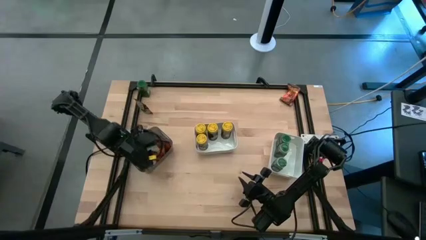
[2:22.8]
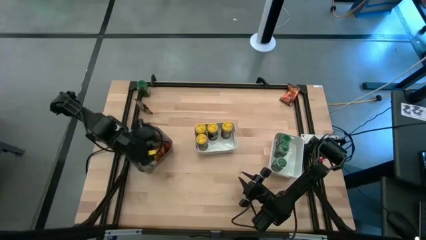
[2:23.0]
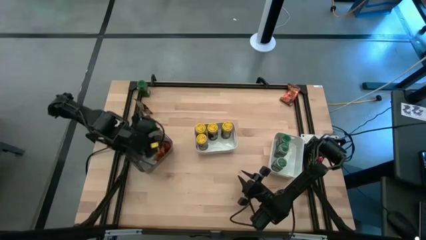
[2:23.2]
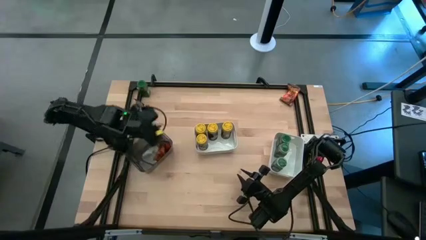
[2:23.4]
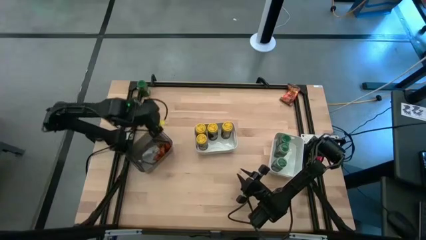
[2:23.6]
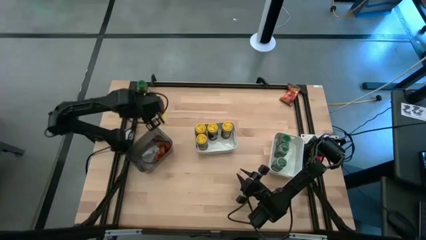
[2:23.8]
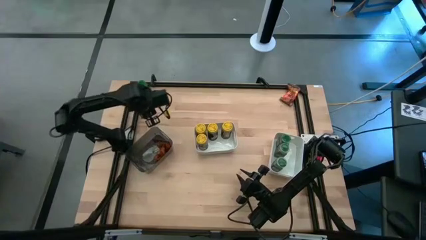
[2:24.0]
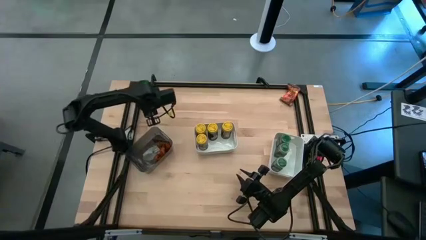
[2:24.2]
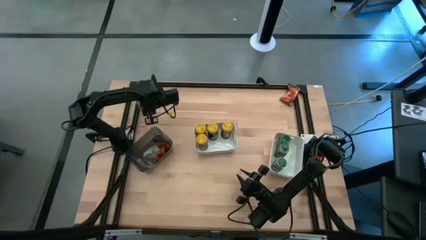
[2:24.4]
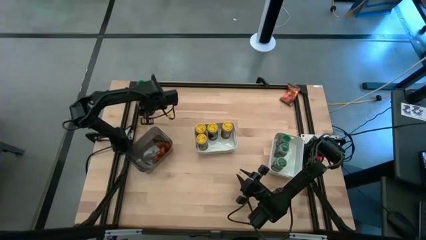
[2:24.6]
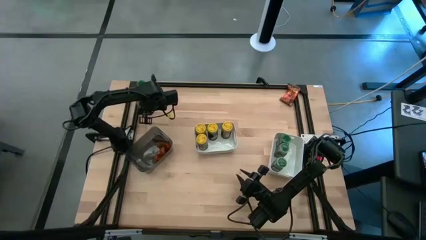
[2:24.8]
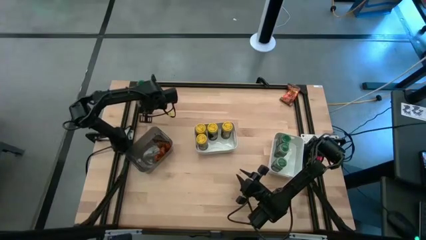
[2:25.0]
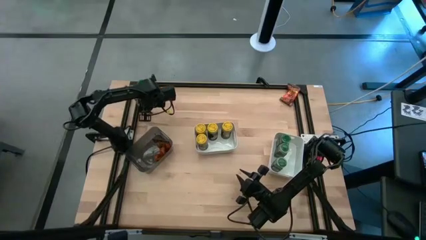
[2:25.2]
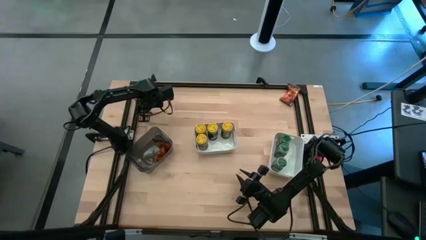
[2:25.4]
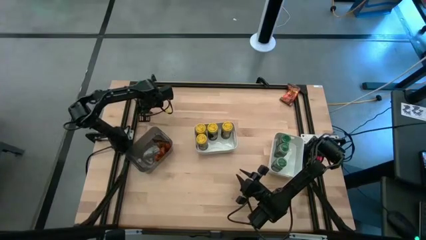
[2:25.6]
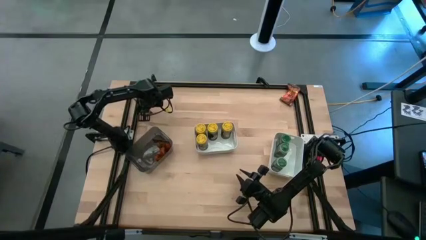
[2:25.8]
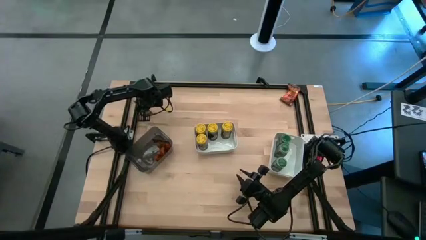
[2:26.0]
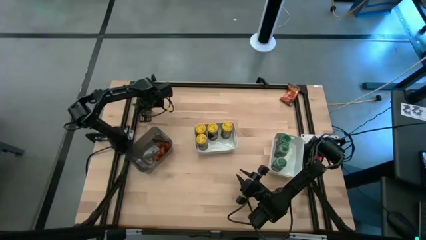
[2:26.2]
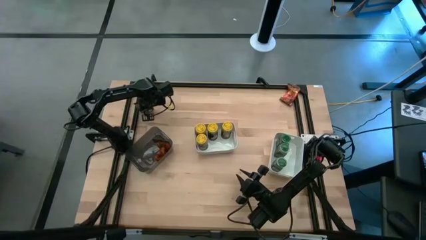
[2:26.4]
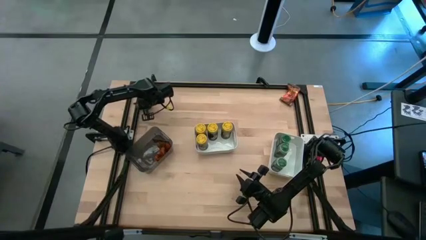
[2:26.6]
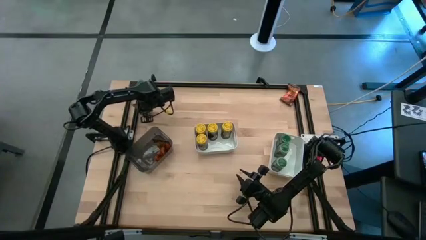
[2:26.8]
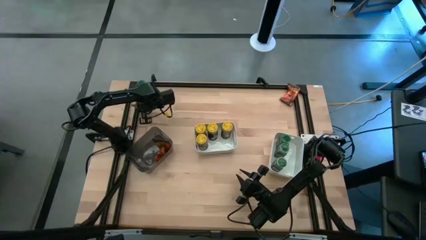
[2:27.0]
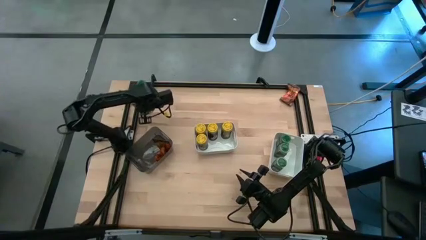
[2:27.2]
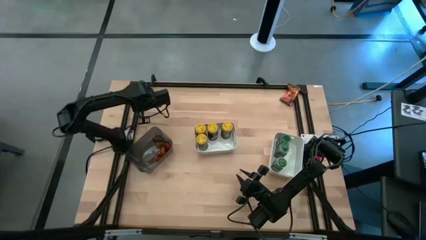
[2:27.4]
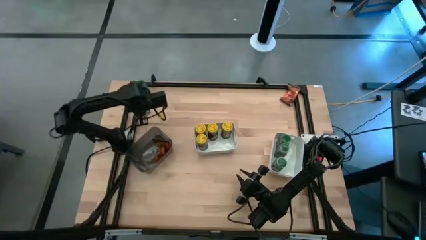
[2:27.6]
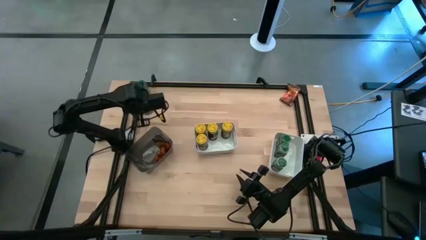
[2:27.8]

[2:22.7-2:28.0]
Task: Sort spices by type
Put the left orange seasoning pack into the black bin

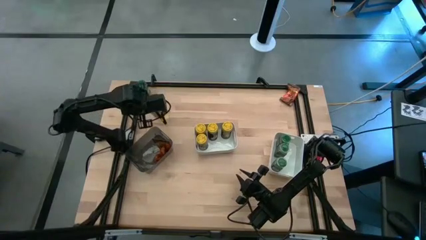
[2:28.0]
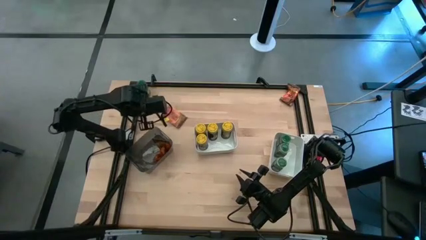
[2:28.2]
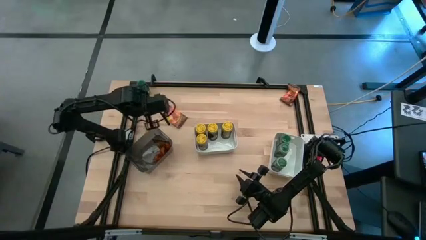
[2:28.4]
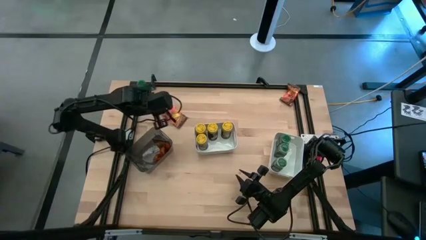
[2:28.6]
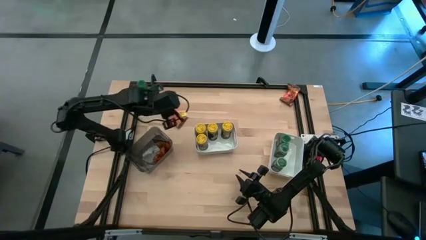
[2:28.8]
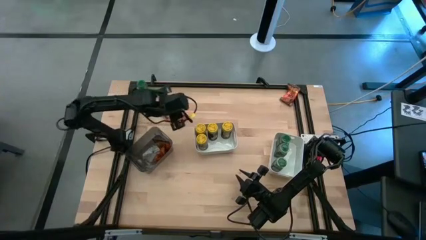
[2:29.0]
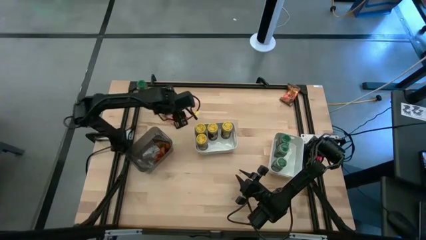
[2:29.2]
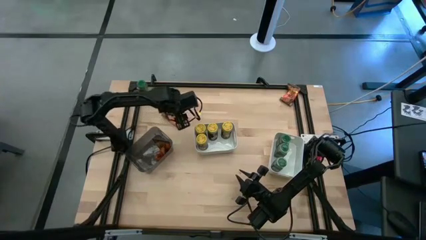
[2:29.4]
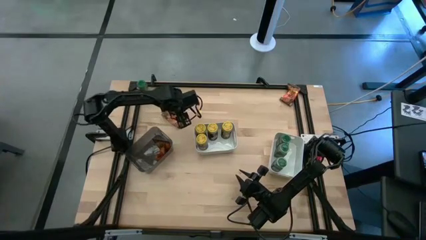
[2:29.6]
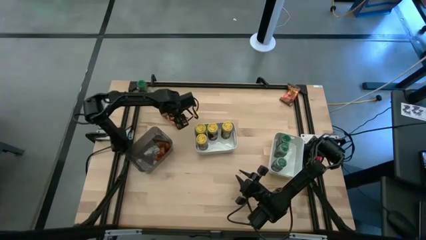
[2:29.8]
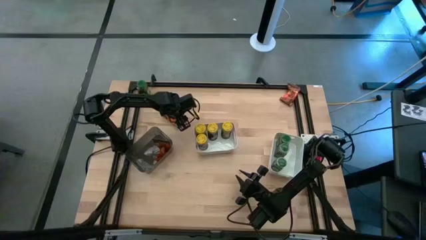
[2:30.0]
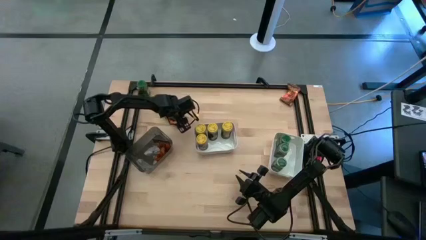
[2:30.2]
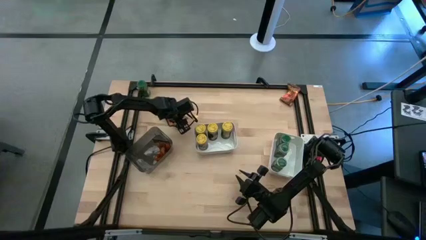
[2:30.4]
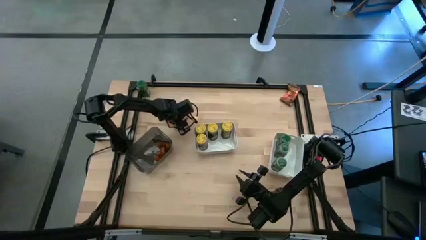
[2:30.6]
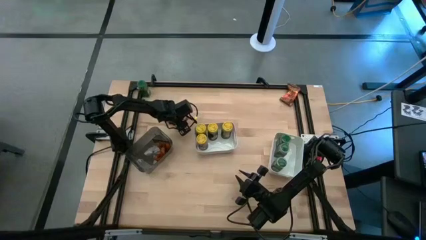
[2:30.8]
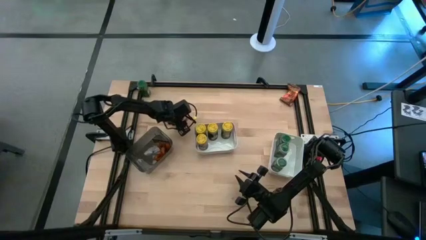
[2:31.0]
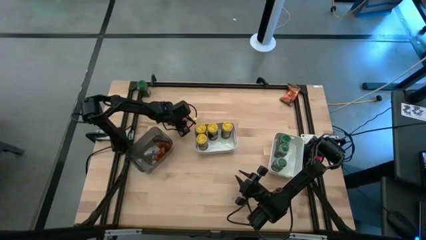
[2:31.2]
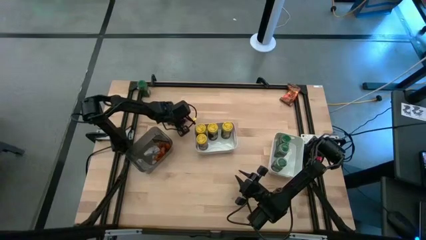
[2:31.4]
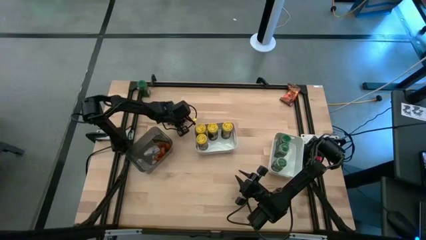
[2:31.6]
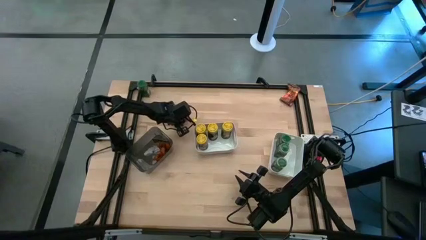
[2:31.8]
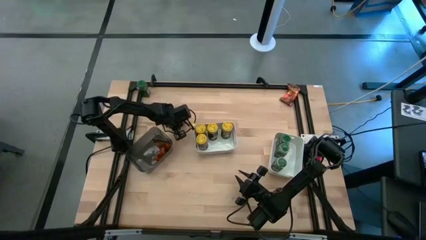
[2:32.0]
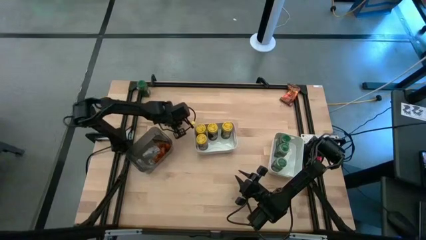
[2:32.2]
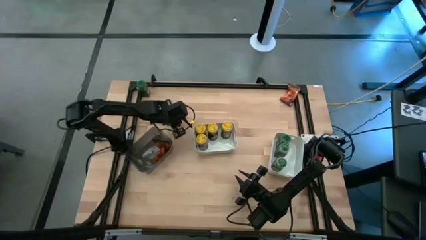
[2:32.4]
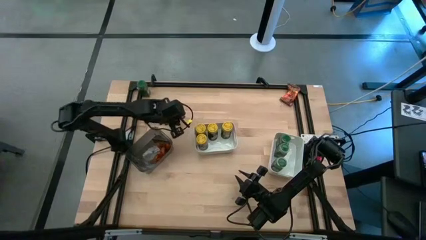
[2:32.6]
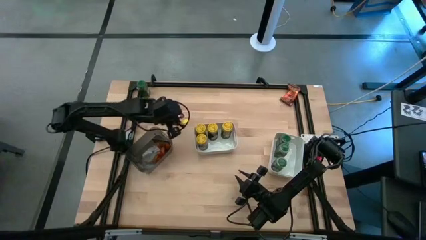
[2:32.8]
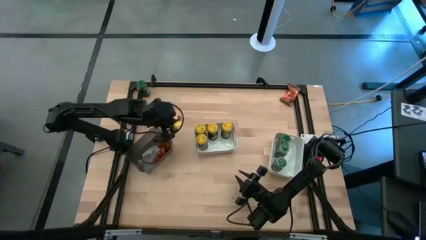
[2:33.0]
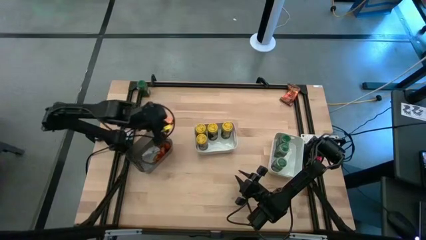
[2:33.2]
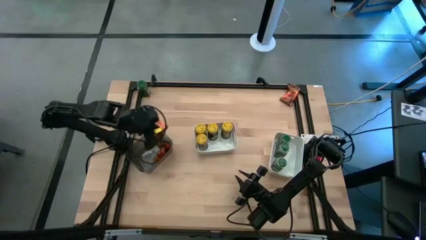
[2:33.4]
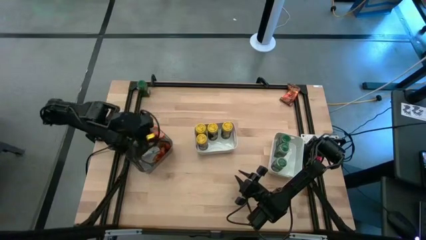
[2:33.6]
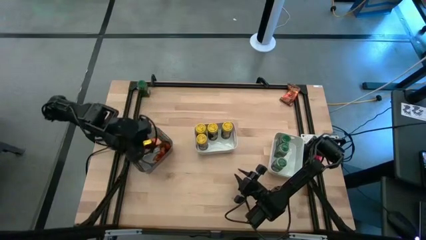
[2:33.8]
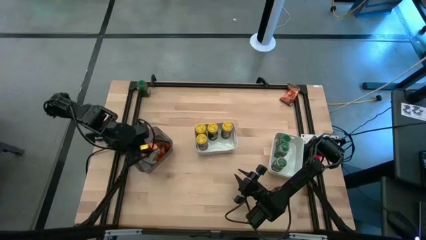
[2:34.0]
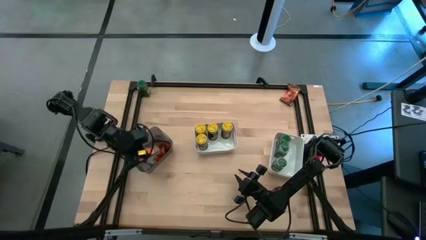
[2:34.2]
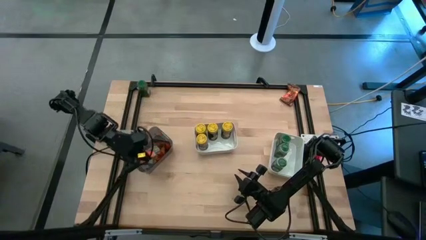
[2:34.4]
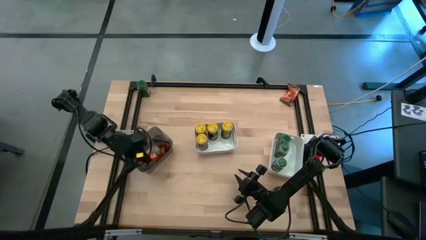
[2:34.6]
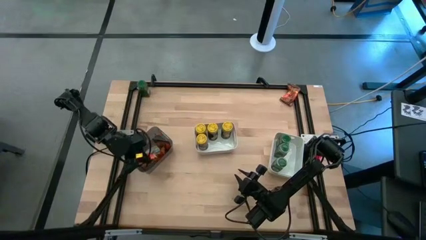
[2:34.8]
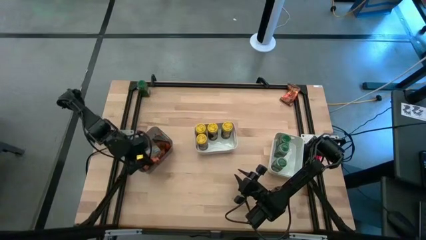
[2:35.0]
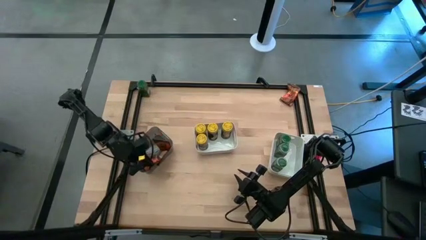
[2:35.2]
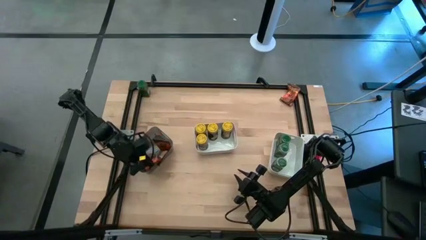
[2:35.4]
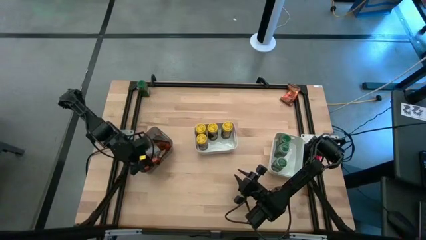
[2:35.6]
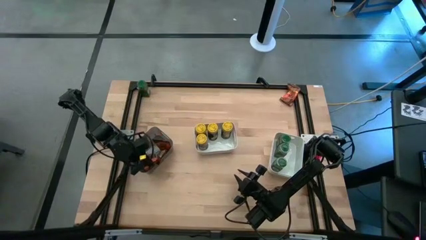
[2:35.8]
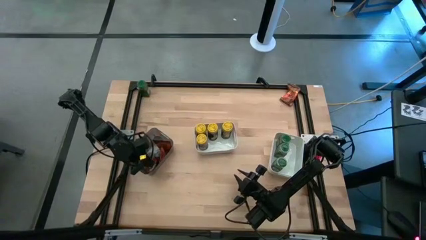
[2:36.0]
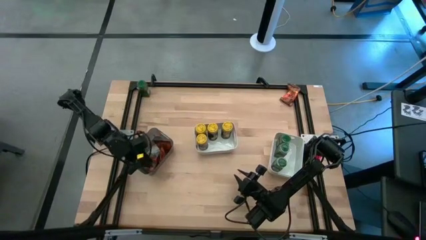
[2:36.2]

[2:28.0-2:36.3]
Put the left orange seasoning pack into the black bin

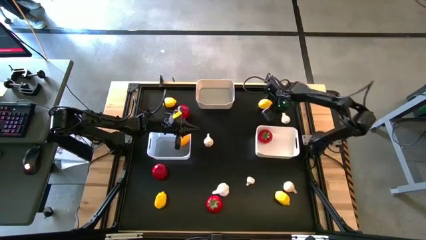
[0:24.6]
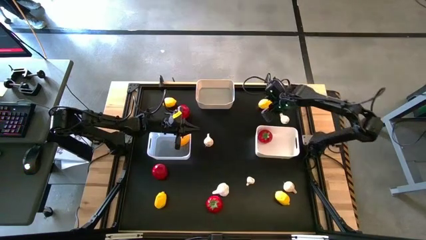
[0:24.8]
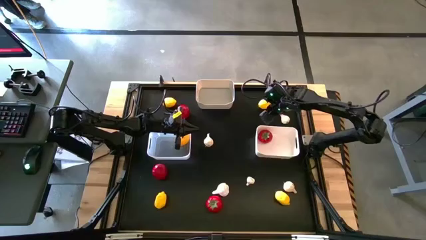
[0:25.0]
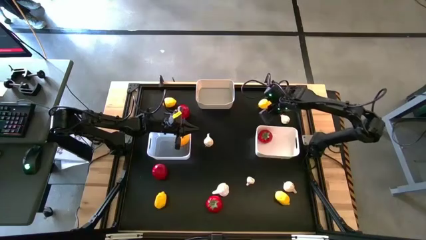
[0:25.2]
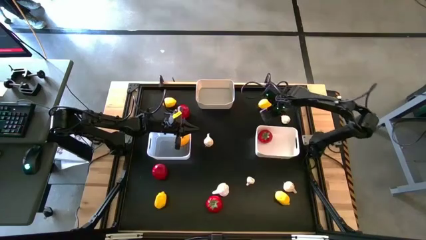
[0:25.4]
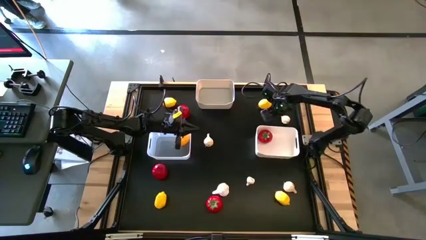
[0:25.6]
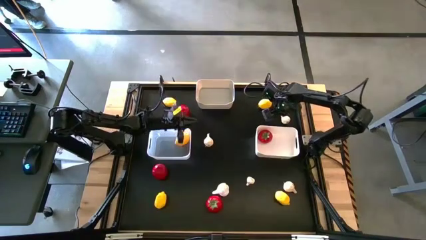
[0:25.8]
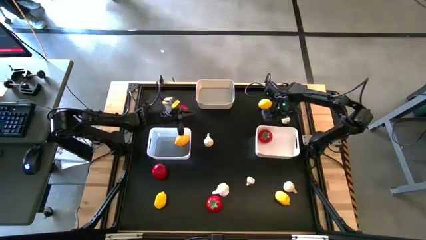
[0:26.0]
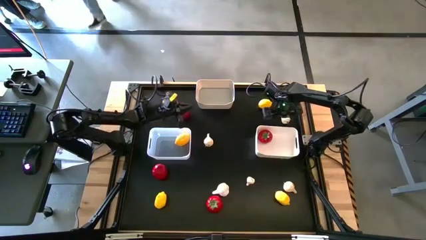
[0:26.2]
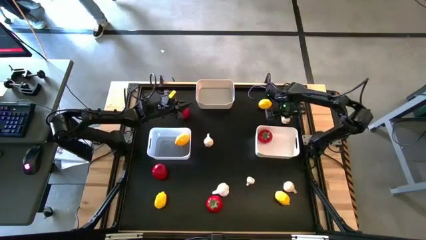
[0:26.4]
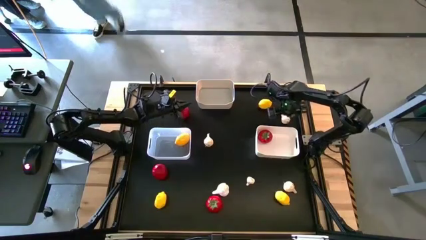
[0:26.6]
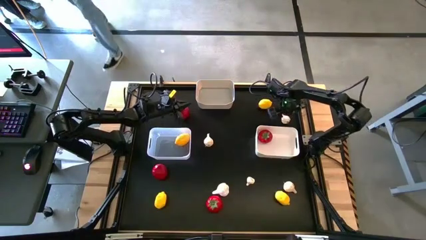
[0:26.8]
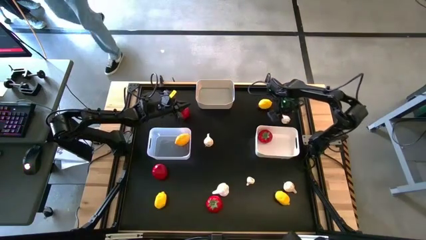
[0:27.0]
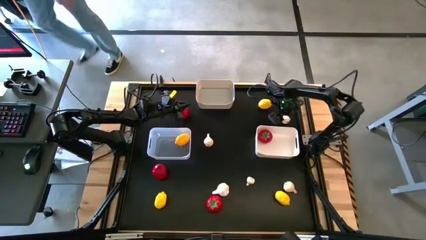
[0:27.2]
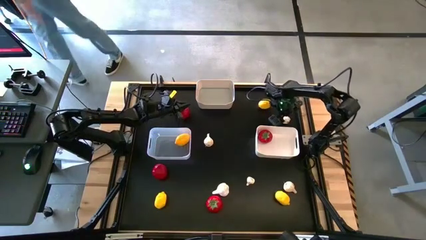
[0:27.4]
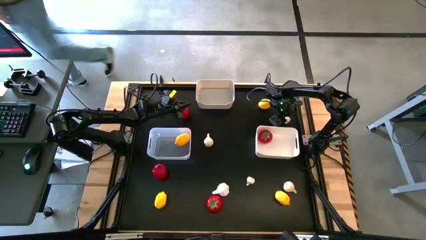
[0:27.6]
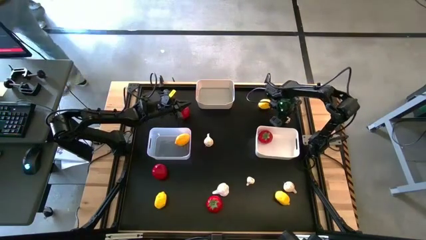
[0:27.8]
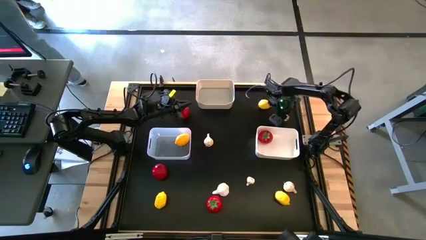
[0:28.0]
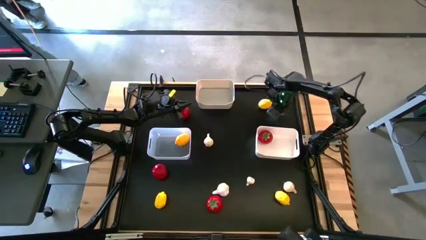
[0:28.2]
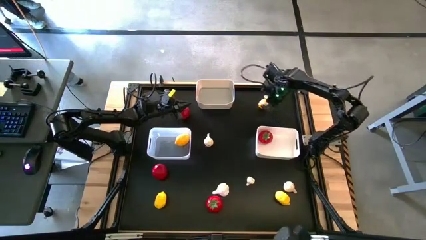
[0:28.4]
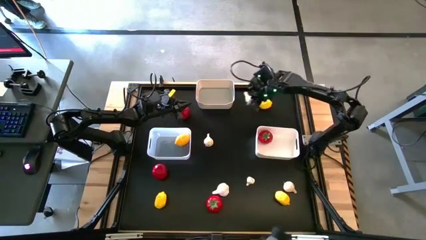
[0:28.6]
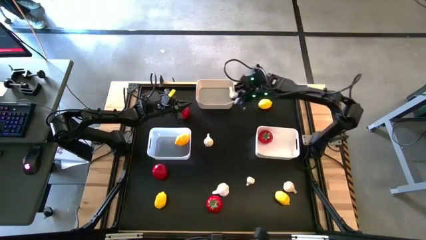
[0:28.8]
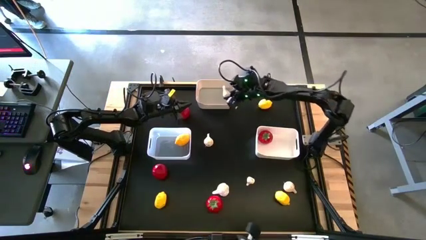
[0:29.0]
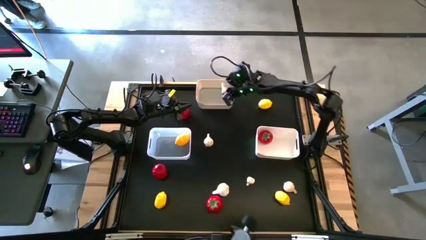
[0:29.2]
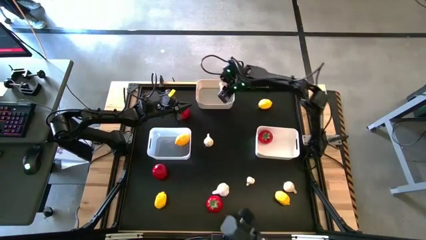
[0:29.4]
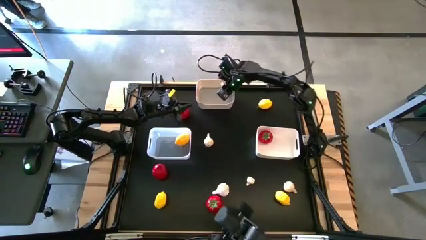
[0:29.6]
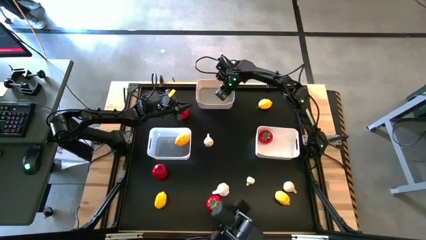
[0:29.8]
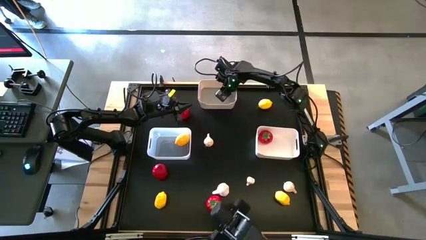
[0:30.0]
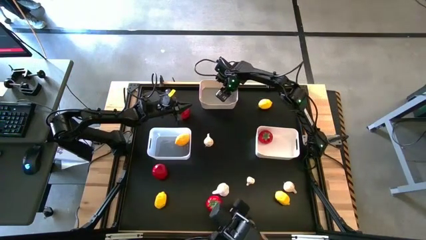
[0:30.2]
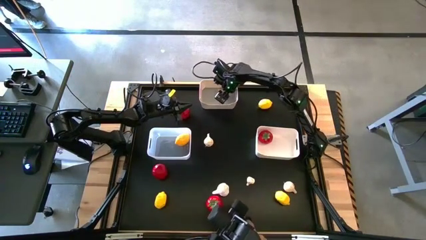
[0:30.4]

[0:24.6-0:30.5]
Task: Sort produce into baskets
Put the white garlic into the top left white bin
